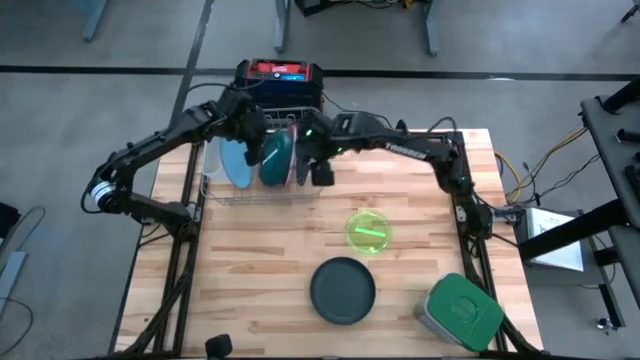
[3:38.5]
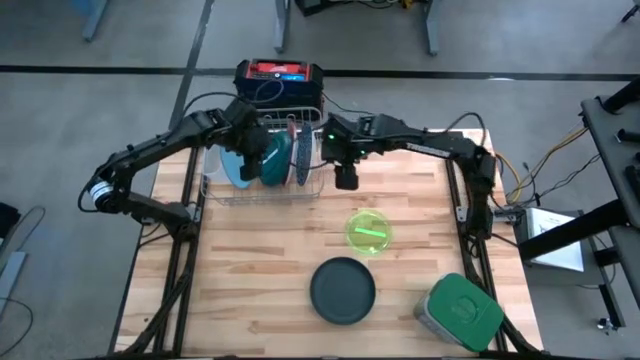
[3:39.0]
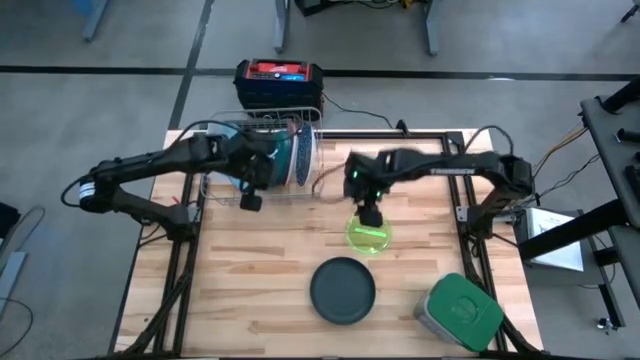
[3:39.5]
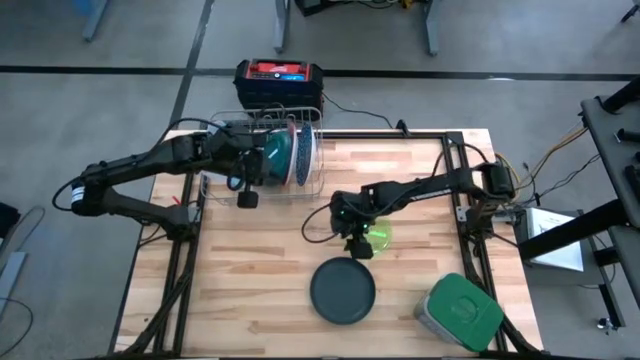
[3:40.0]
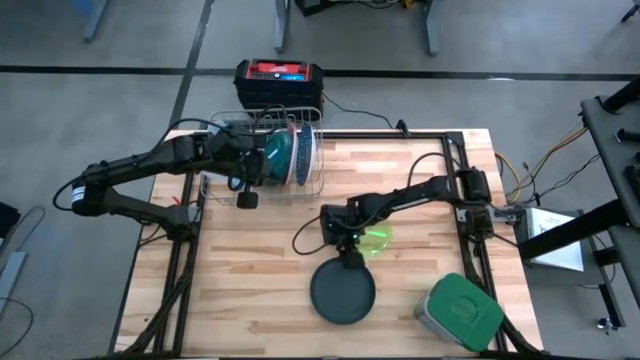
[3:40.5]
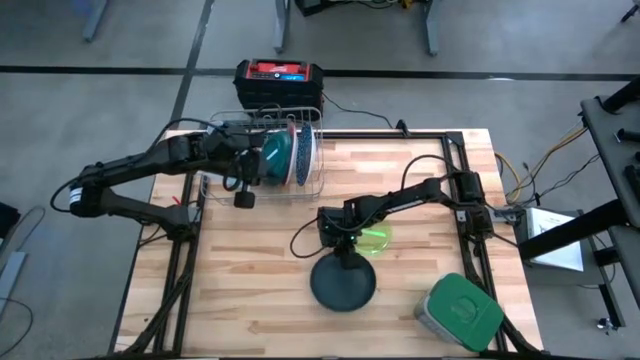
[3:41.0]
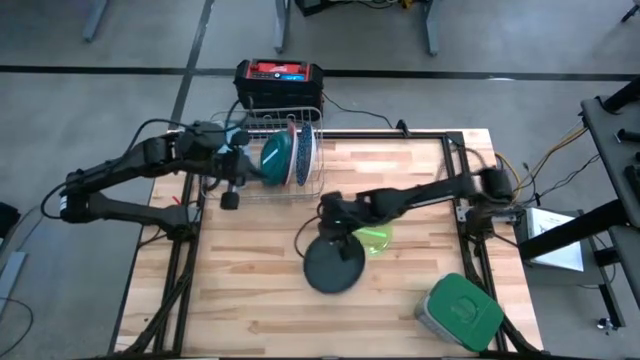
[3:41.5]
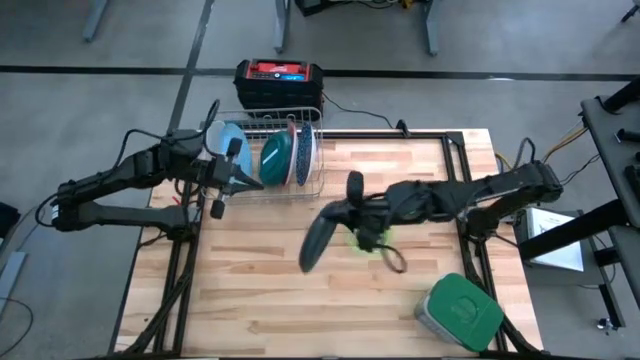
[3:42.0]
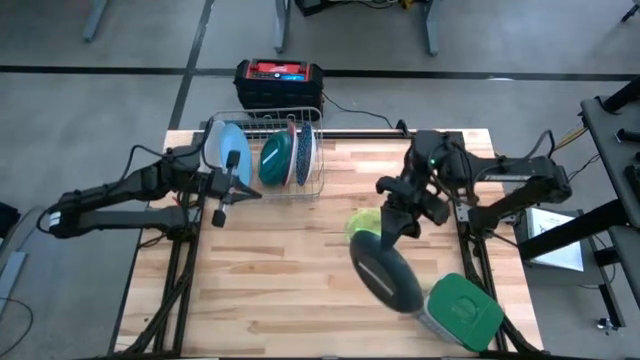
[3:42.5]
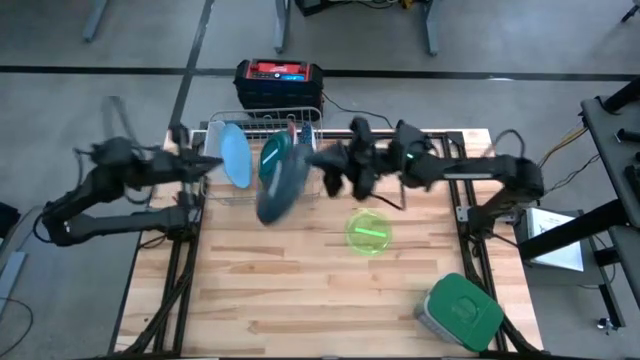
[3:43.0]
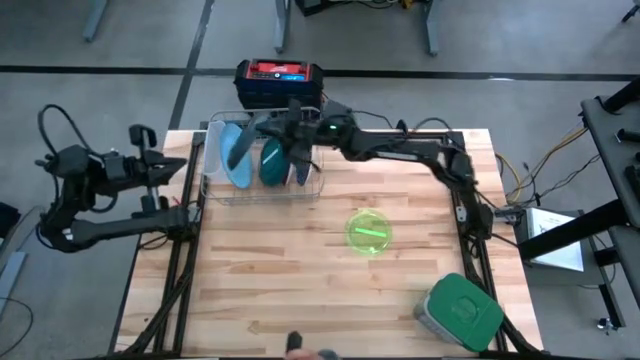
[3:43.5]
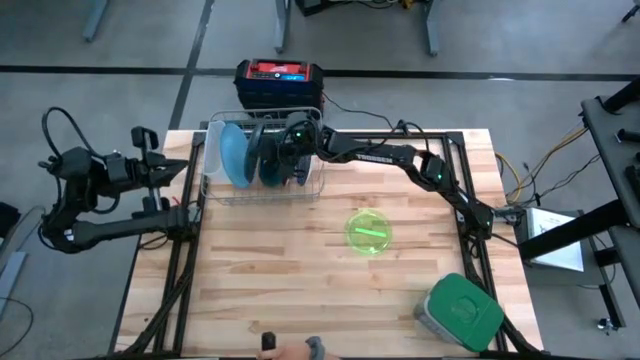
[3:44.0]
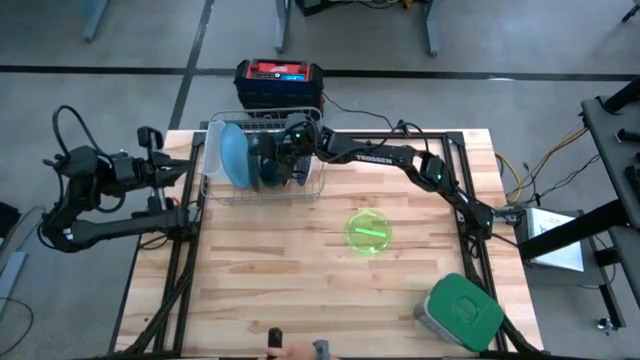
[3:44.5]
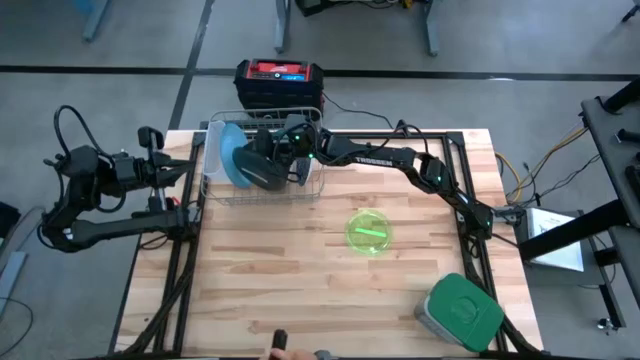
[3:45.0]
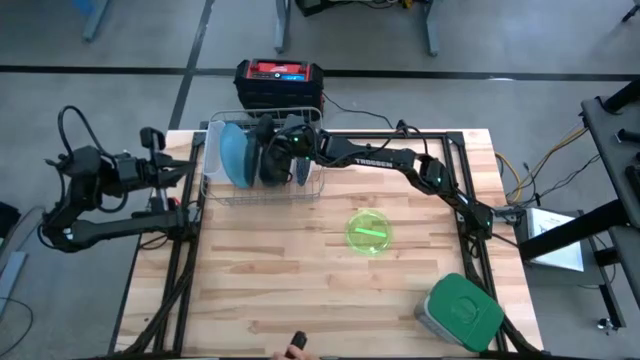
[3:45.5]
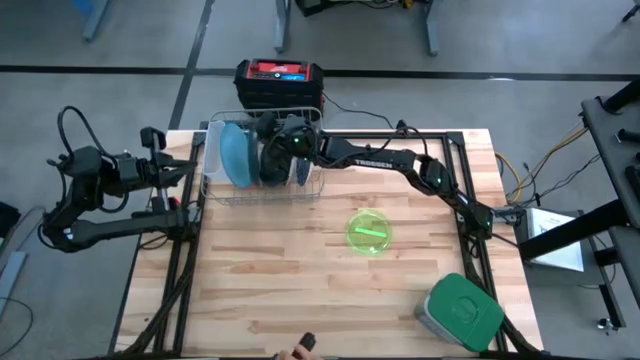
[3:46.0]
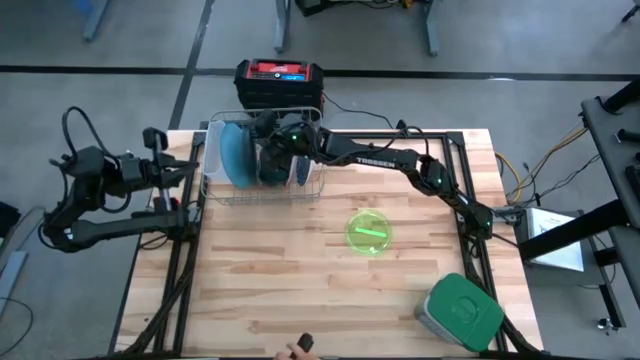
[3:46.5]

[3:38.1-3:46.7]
Task: Sort dishes
Put the dark green plate into the dish rack

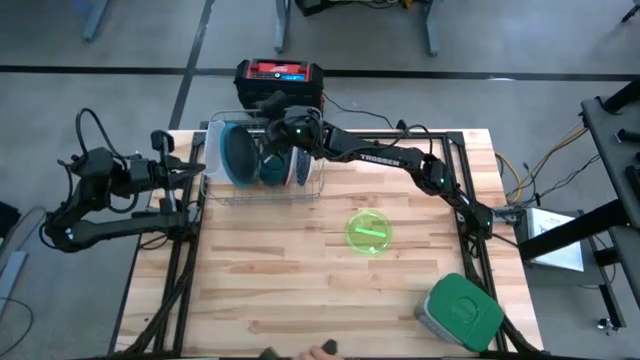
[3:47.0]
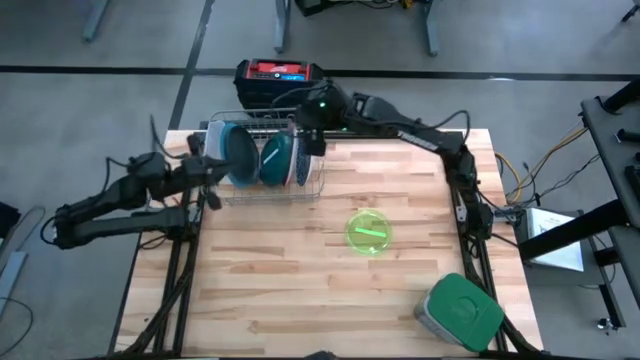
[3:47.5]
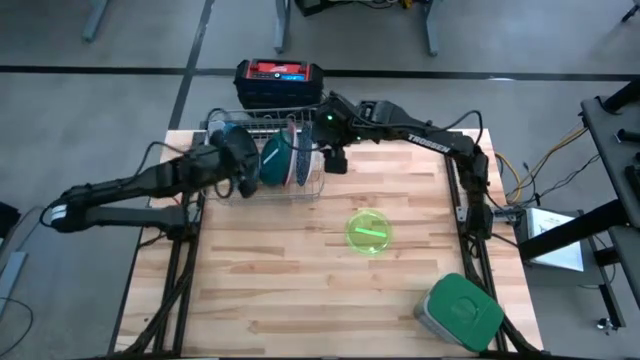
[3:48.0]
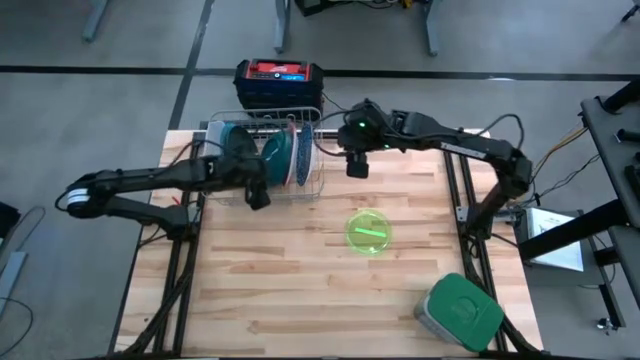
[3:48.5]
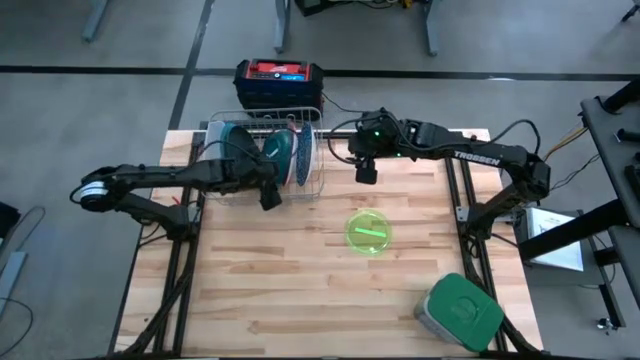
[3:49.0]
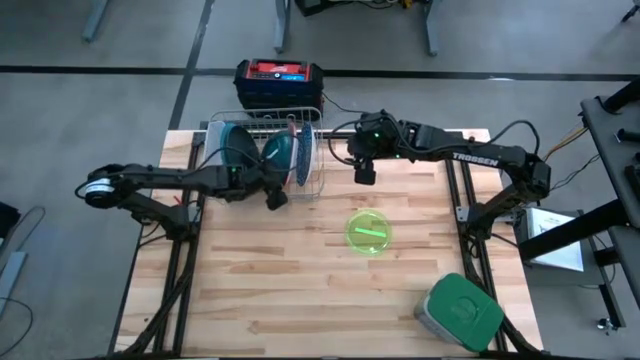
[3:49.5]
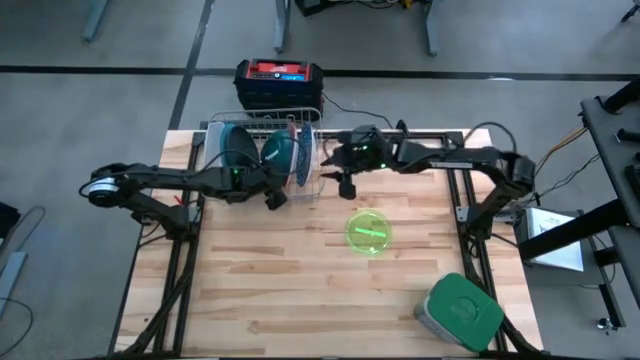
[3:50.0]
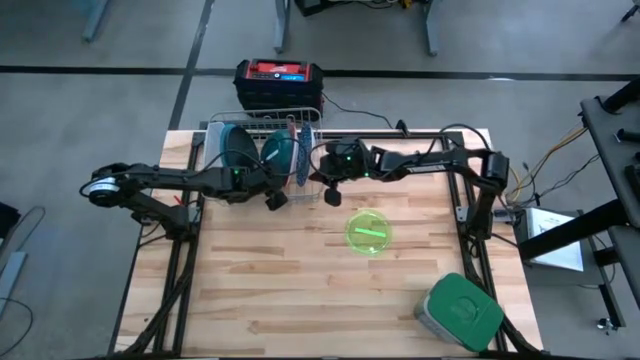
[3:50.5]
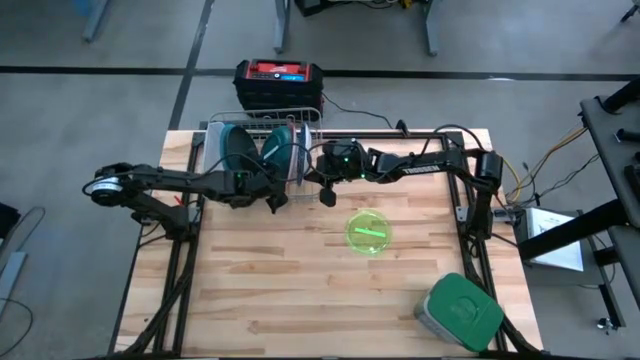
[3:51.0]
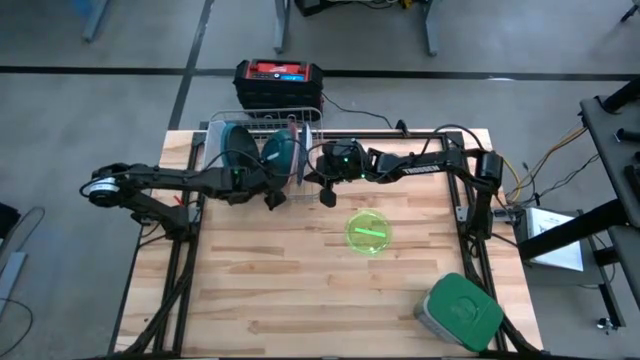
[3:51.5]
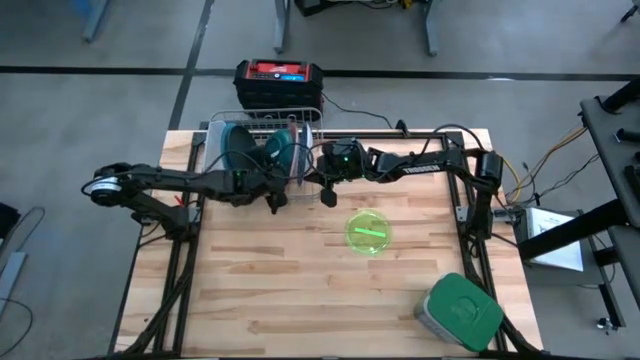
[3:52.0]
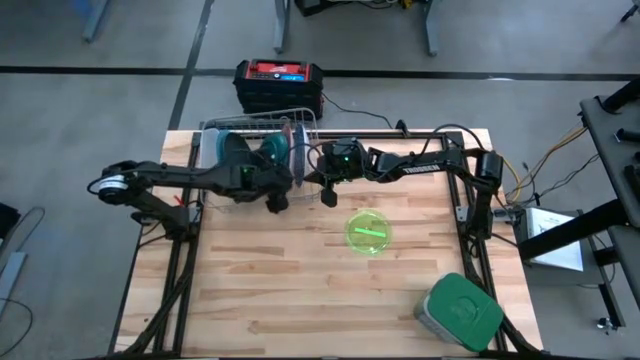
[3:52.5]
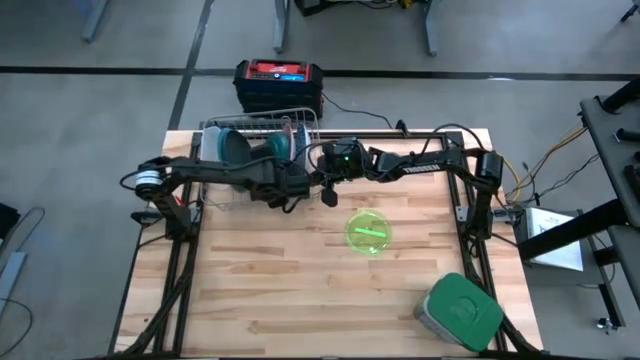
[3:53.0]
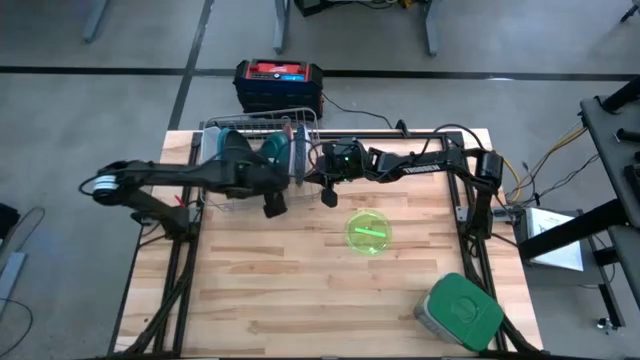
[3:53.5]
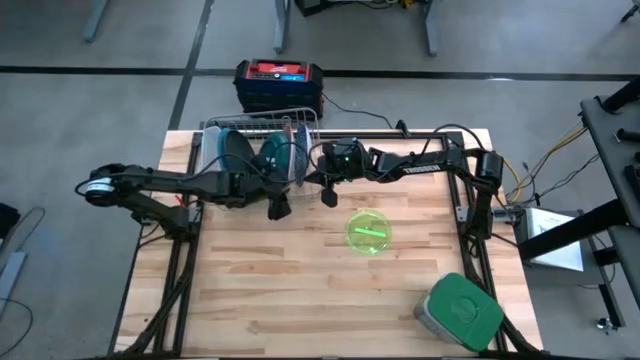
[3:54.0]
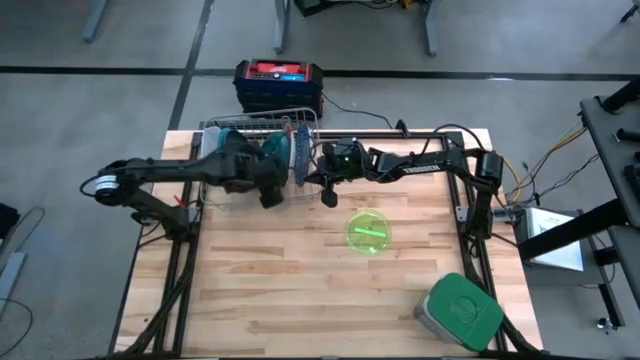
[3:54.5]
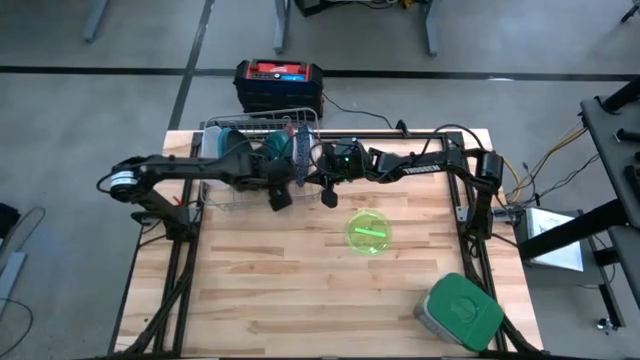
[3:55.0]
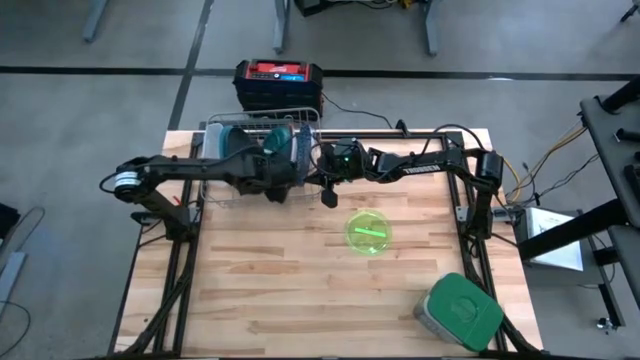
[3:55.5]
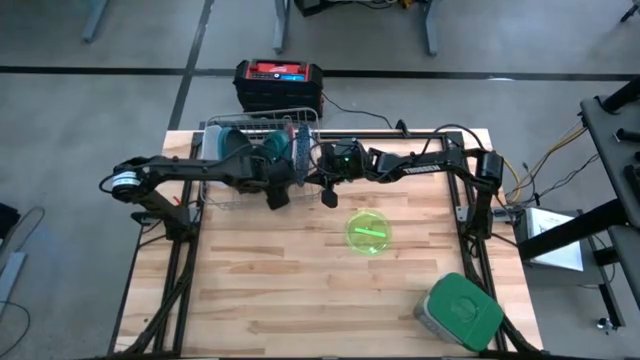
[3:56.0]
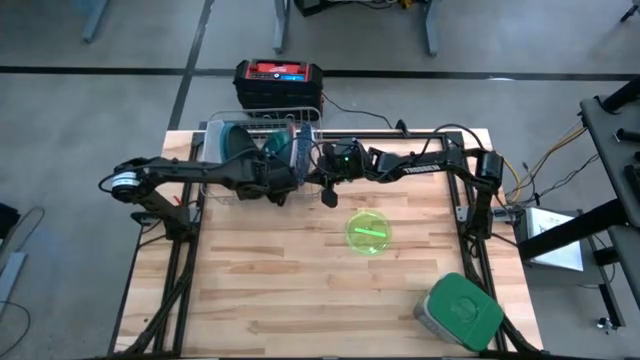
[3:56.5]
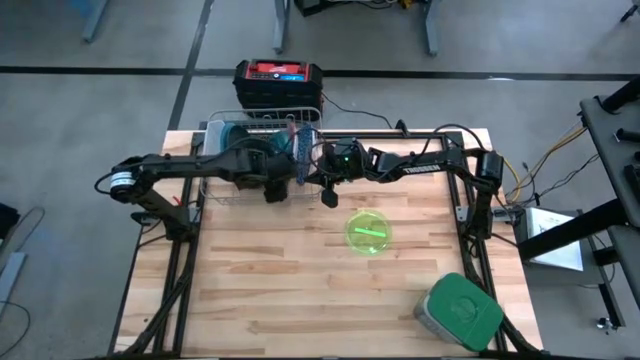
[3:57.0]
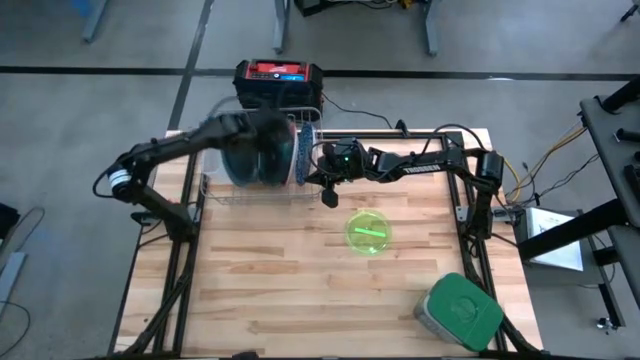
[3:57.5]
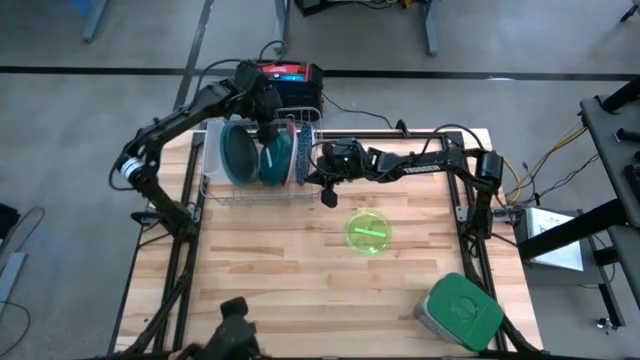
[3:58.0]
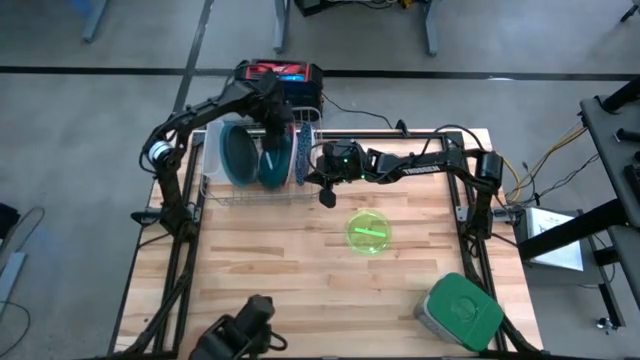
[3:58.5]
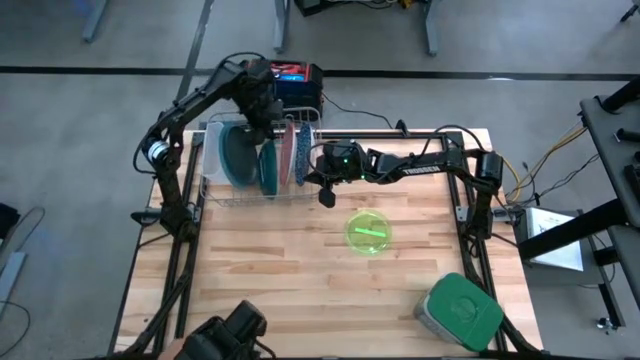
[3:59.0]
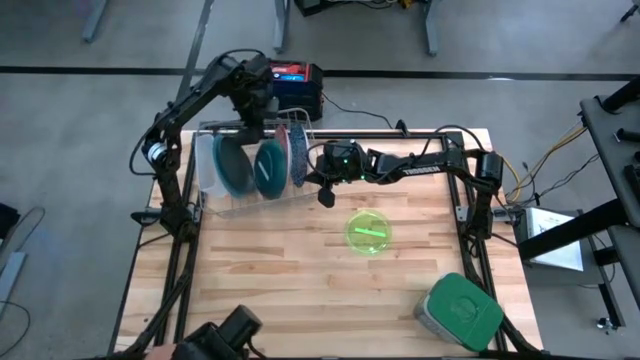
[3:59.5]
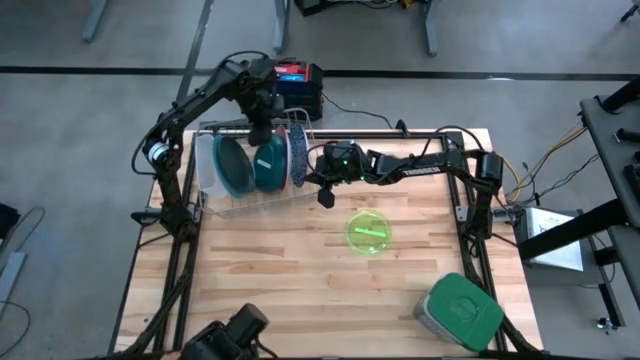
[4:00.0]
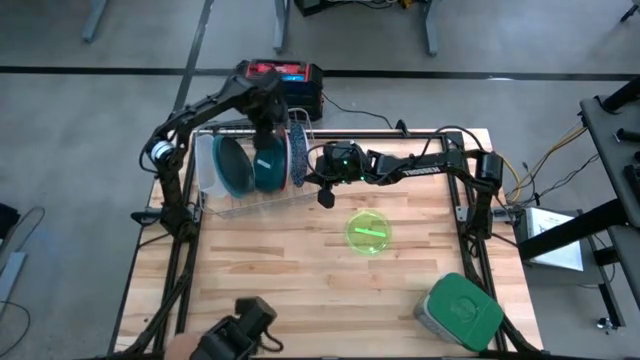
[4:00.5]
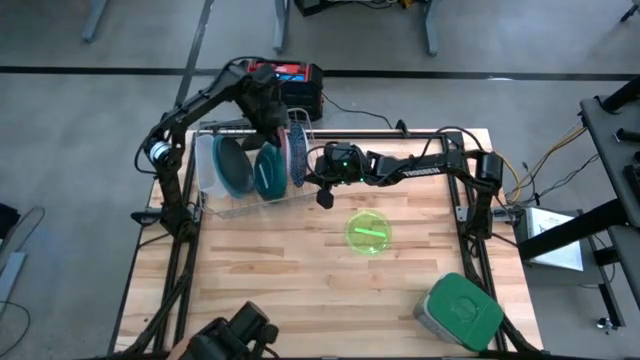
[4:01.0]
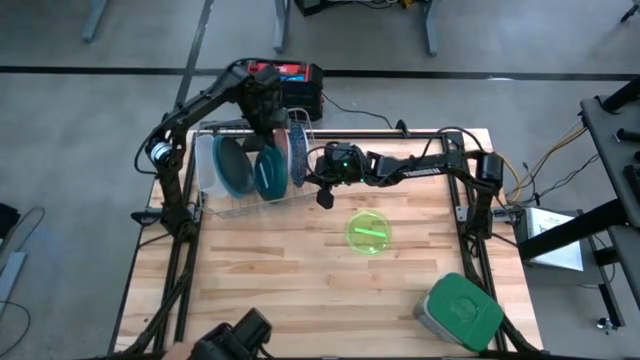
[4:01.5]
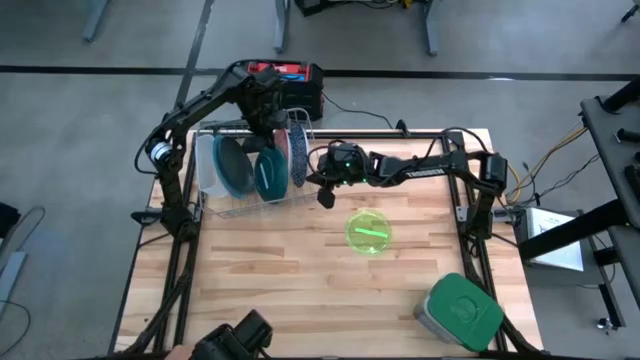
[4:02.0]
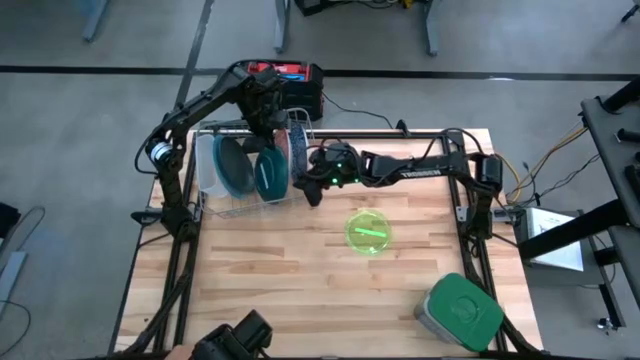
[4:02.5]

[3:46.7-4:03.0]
Put the green plate into the dish rack
